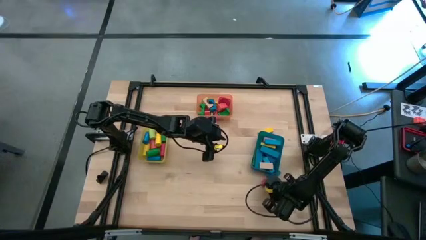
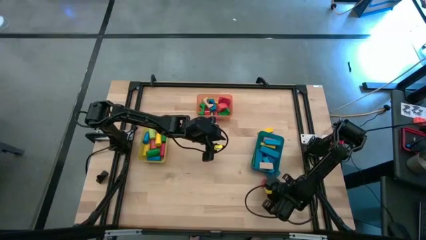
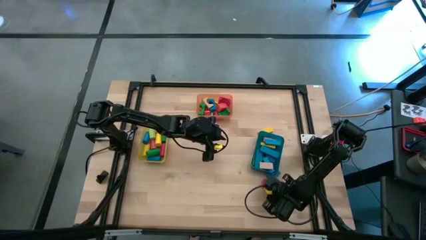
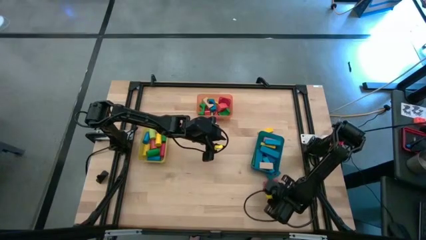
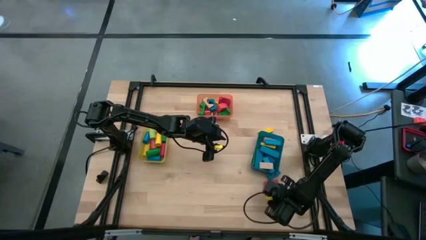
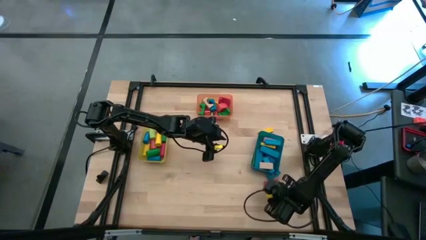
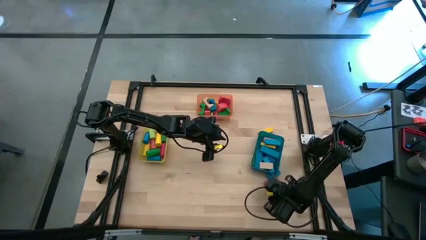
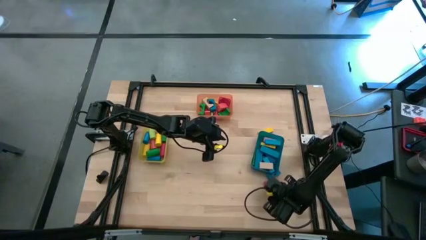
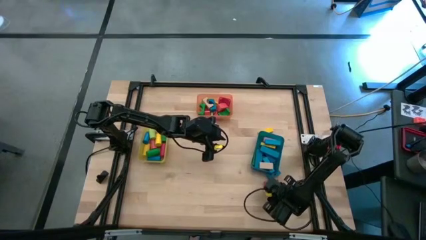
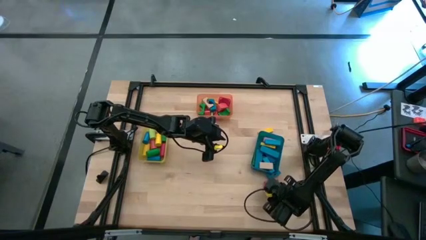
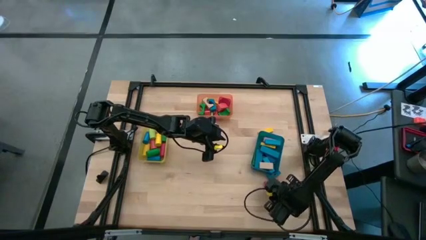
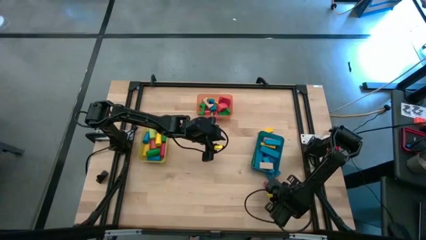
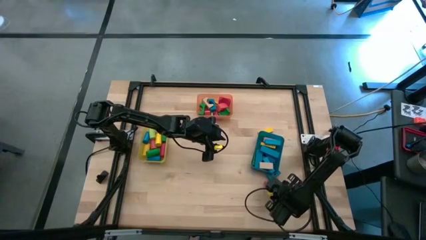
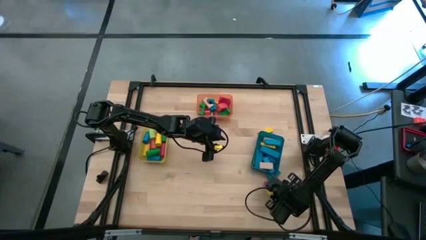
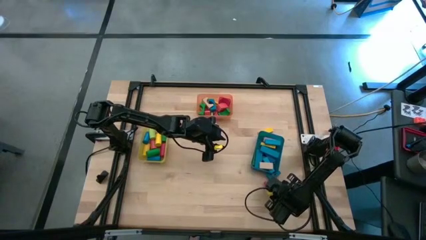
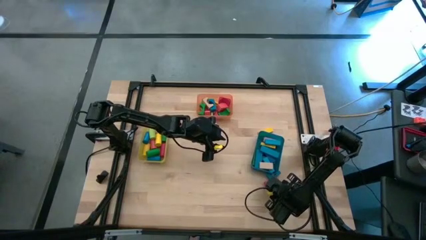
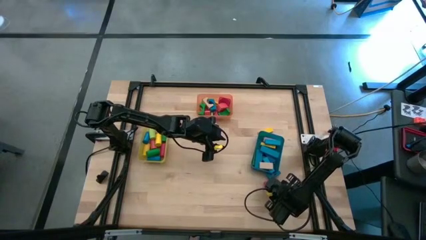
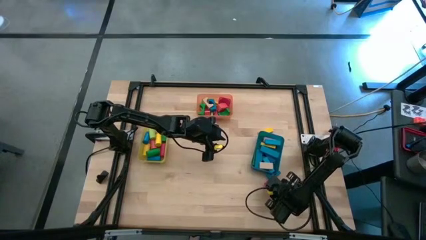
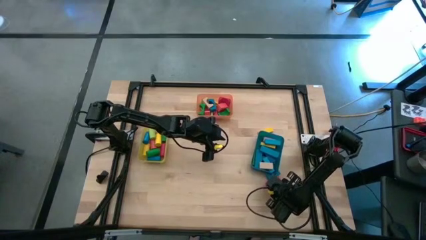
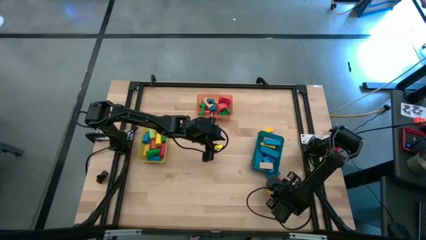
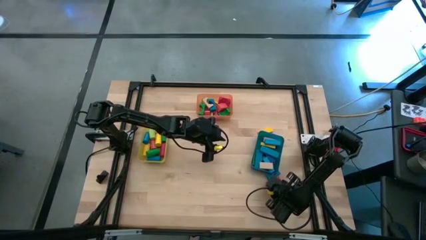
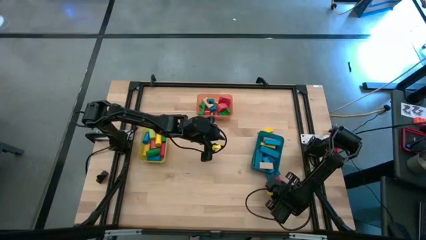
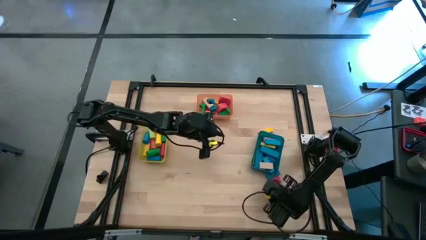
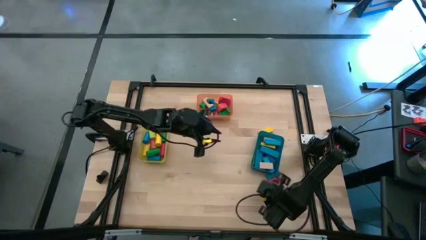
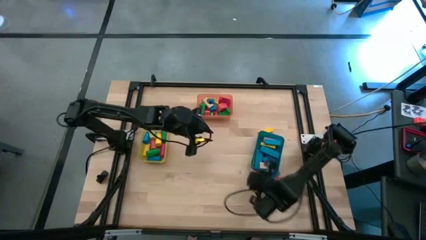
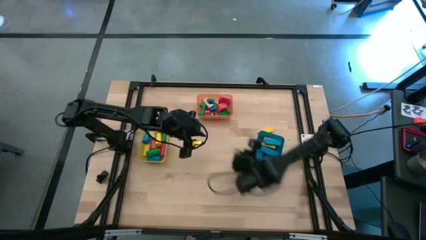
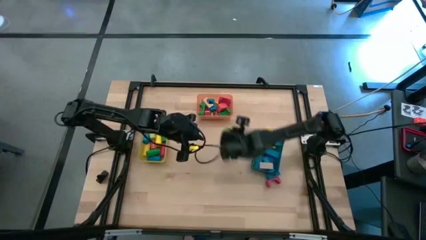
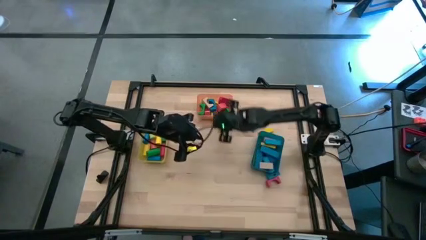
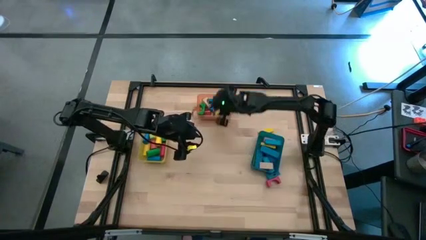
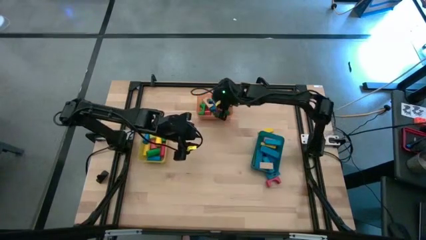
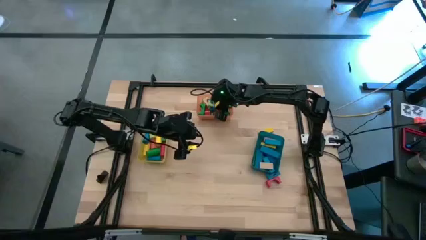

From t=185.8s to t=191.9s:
Task: Sort blocks by size
Put the light green arch block into the orange bin

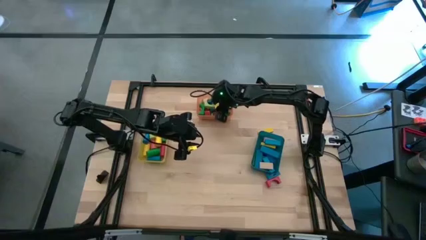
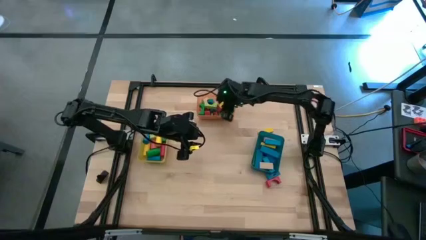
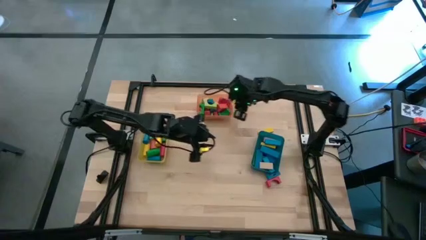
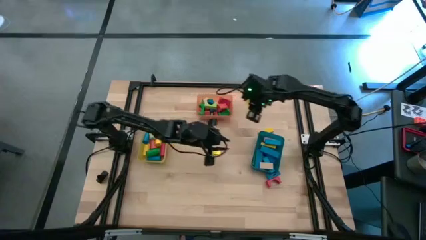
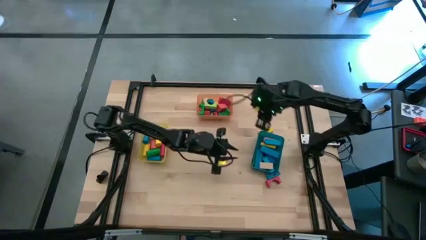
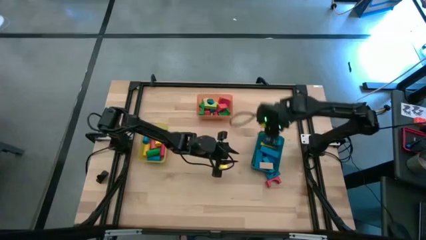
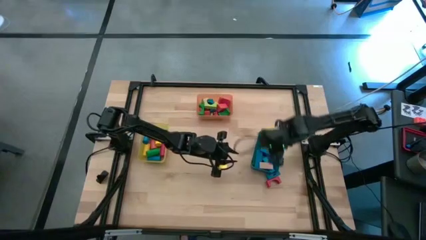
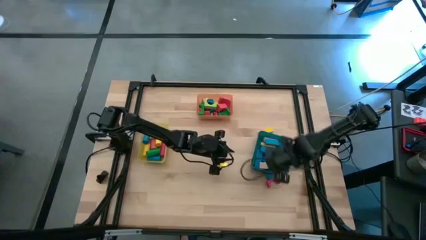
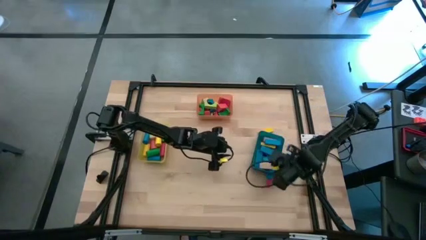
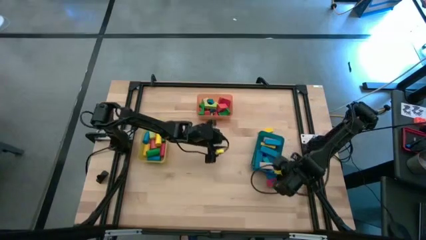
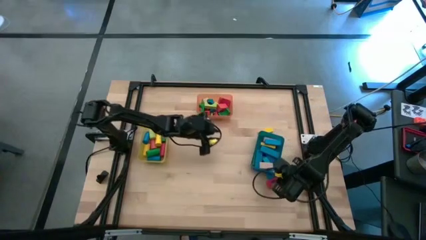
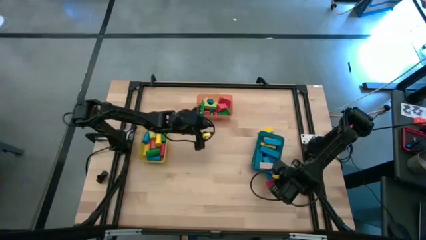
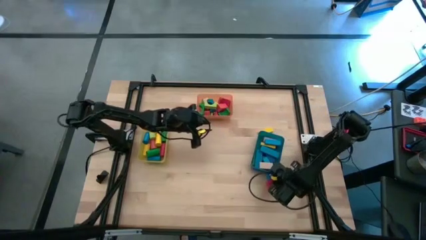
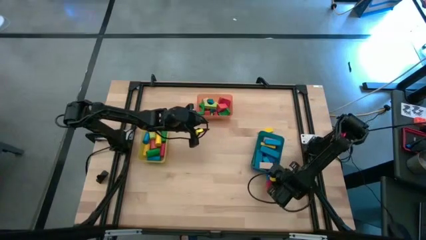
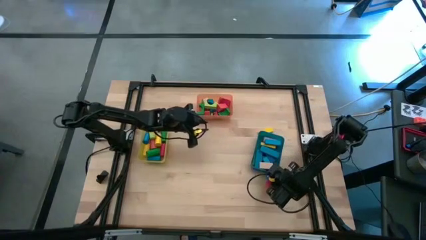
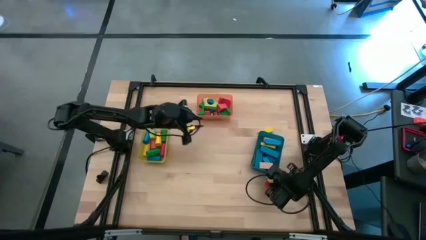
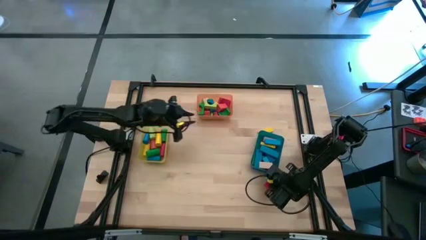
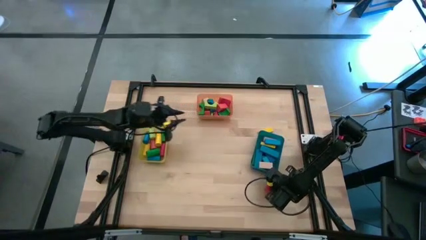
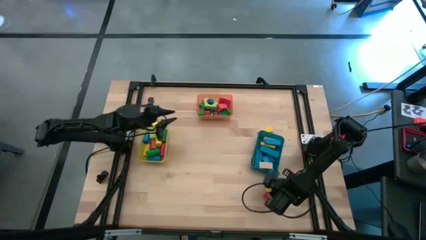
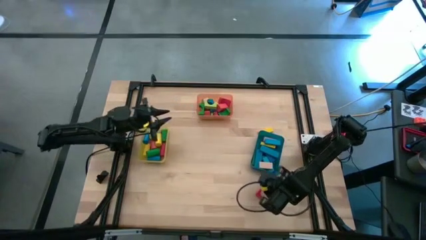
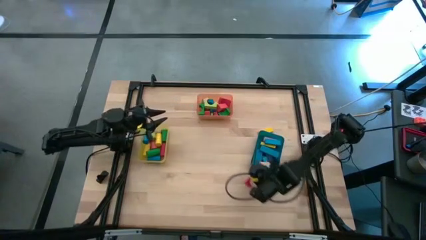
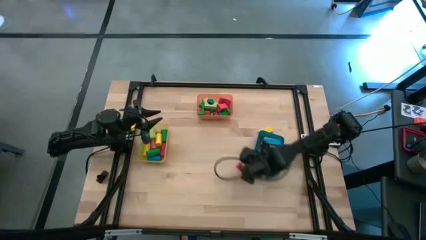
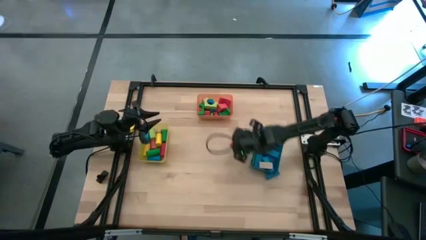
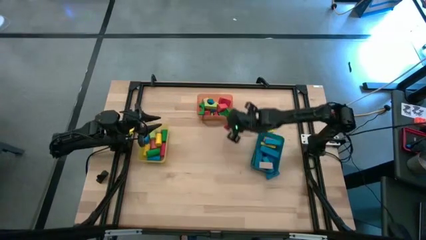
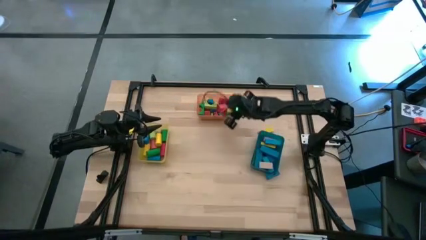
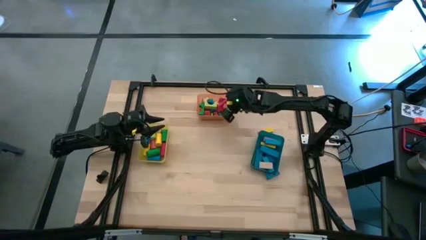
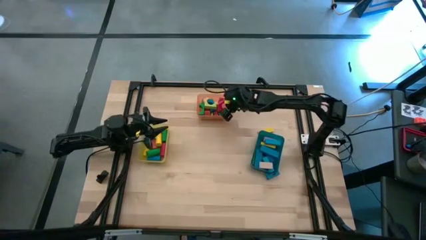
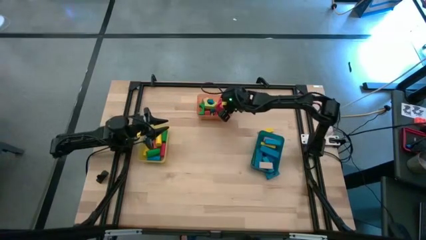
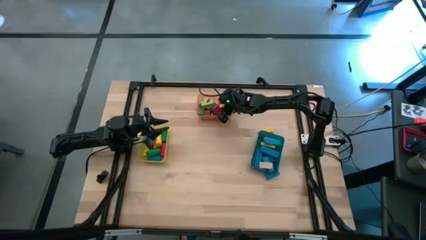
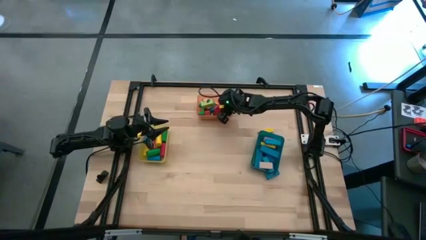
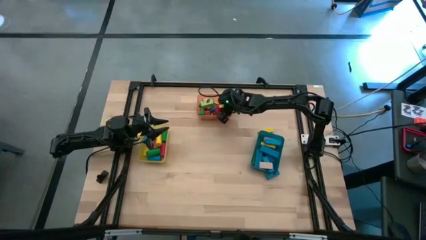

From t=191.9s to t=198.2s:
Put the red arch block into the orange bin

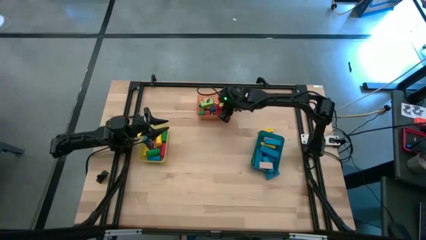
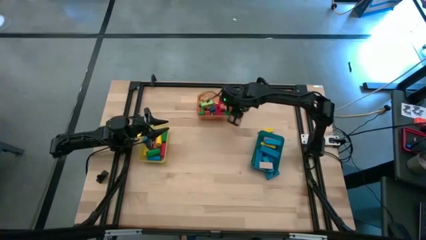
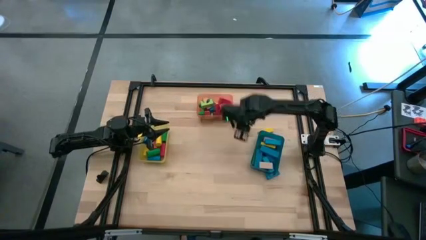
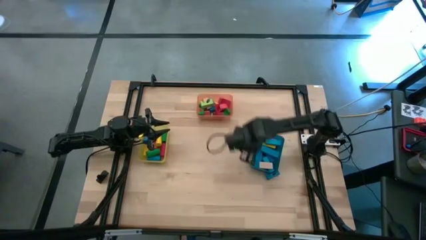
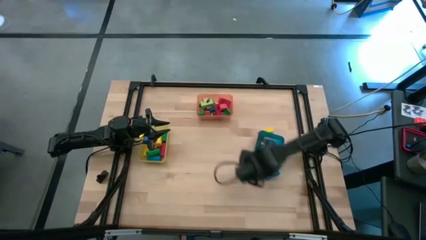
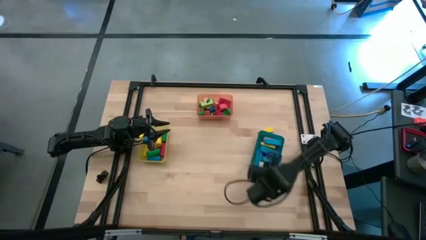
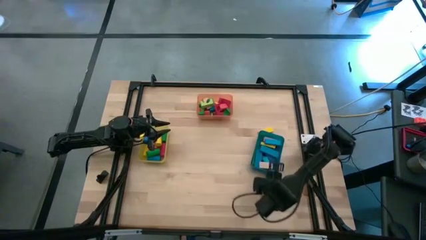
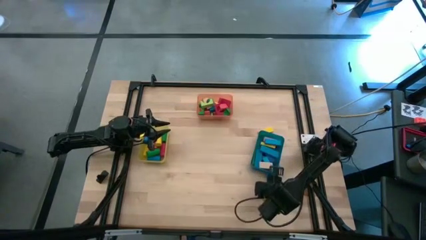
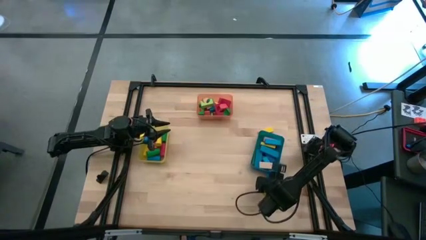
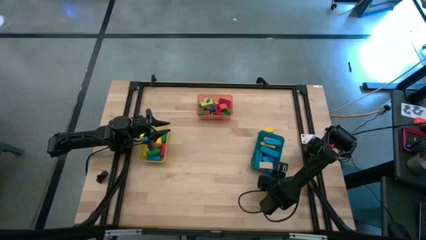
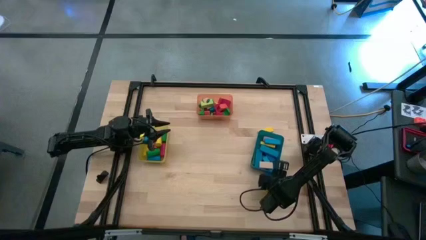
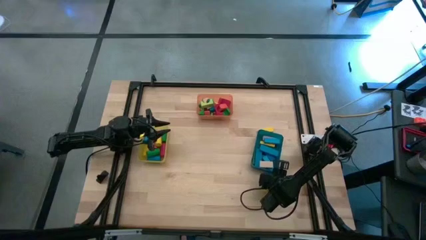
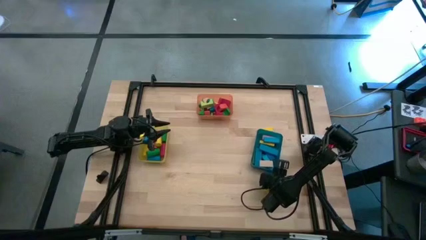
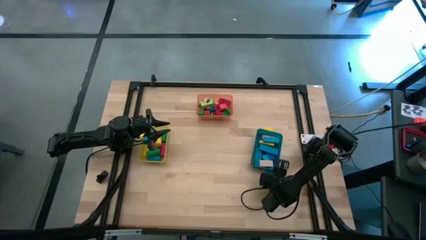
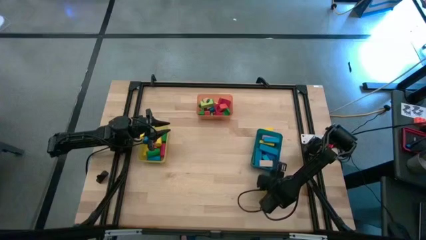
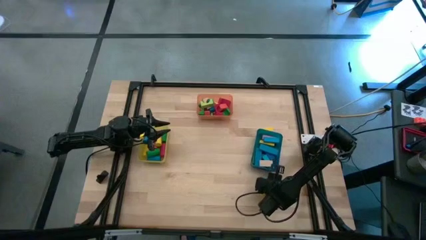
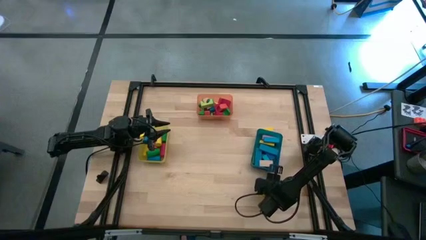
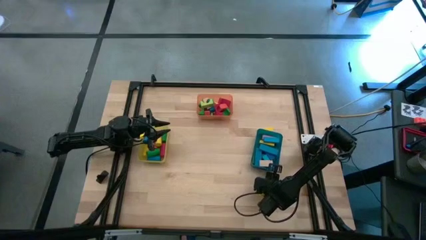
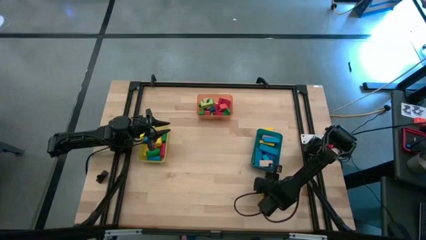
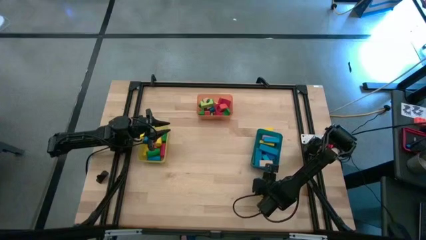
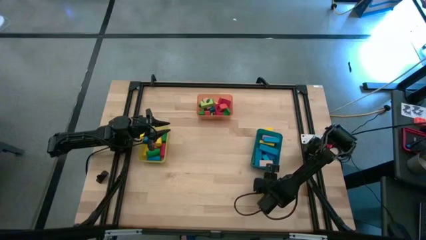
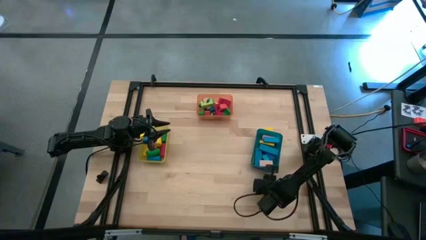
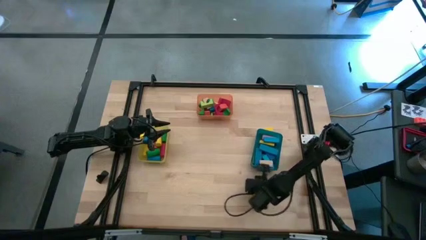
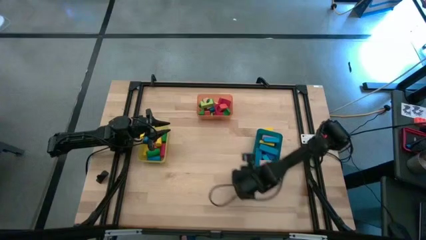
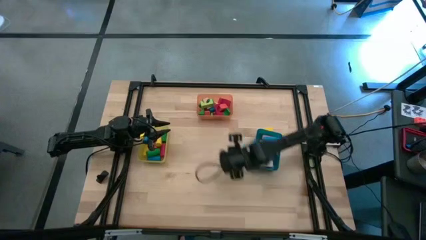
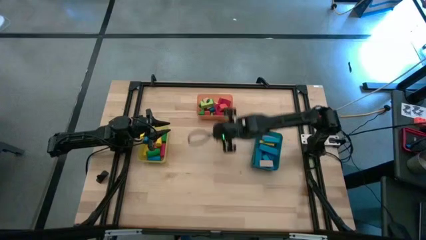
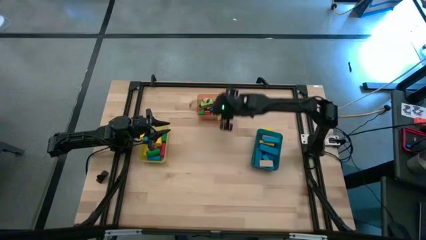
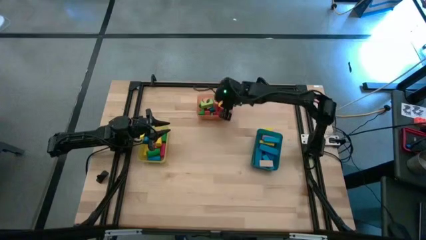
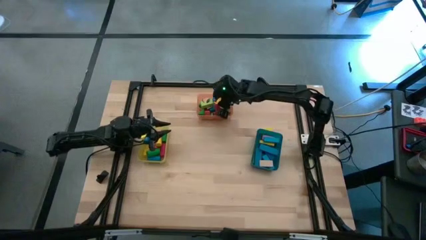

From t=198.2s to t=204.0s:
Put the blue arch block into the orange bin
